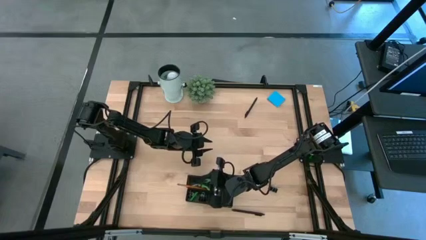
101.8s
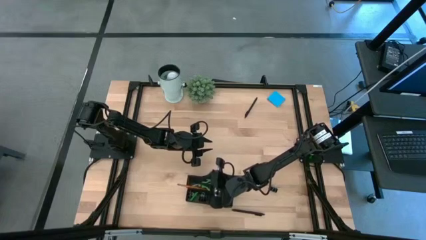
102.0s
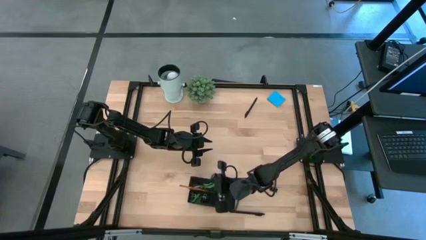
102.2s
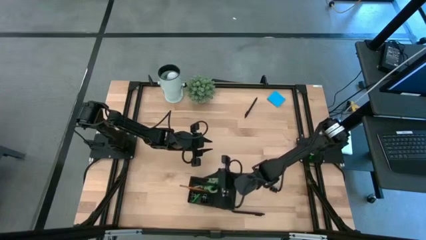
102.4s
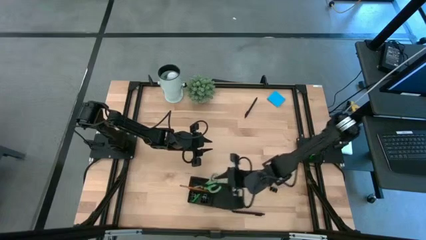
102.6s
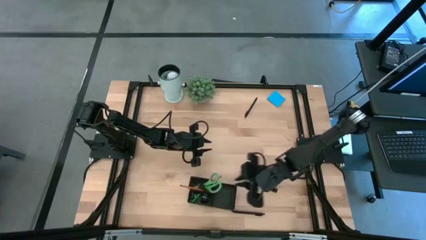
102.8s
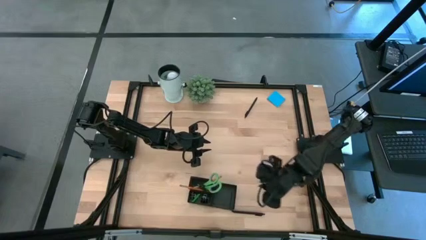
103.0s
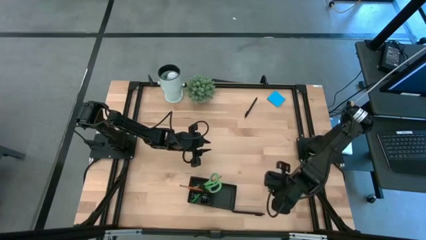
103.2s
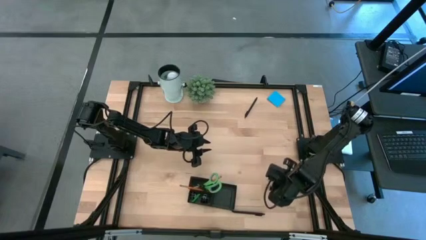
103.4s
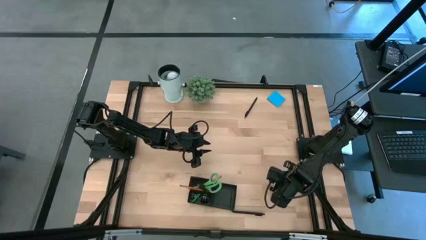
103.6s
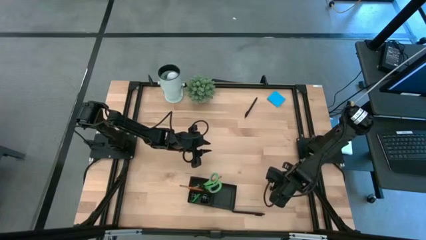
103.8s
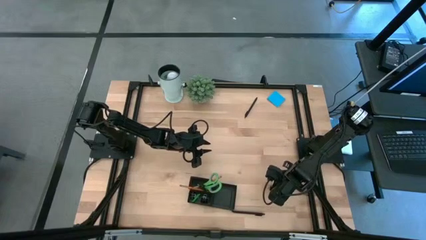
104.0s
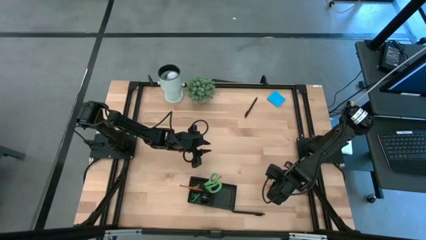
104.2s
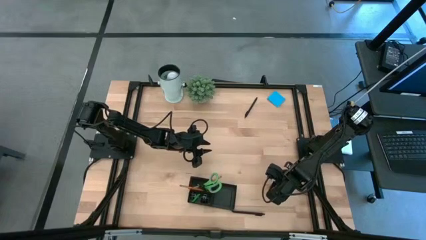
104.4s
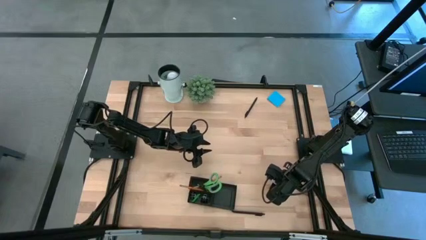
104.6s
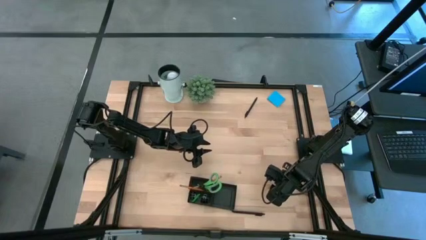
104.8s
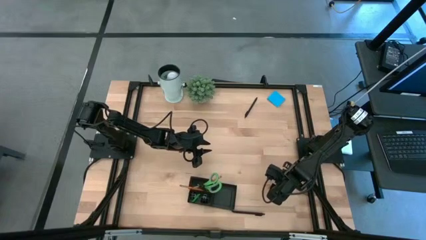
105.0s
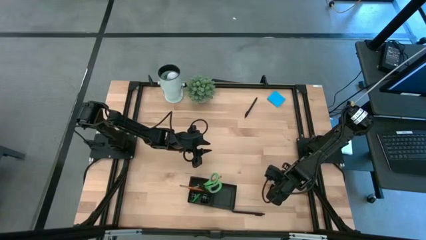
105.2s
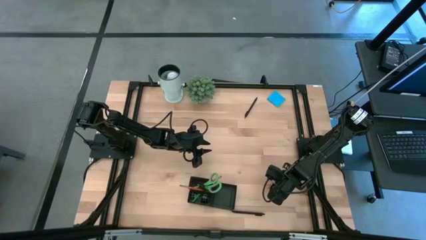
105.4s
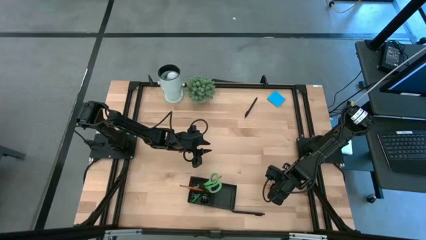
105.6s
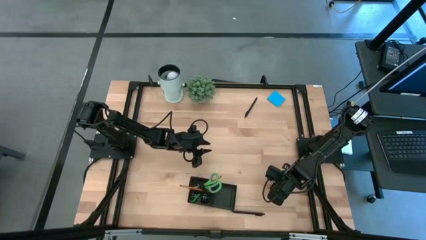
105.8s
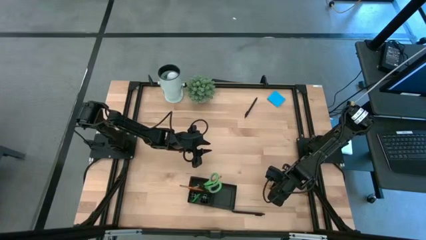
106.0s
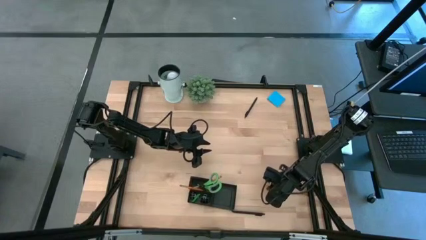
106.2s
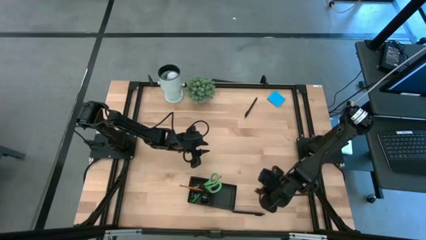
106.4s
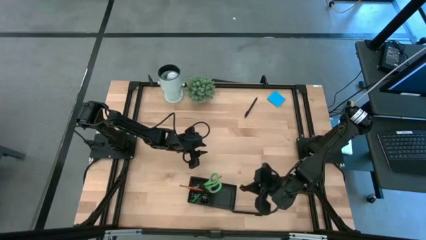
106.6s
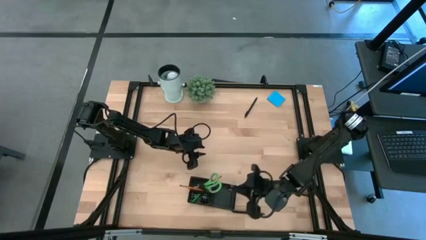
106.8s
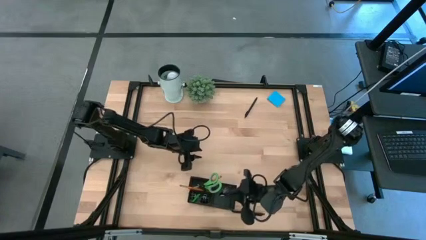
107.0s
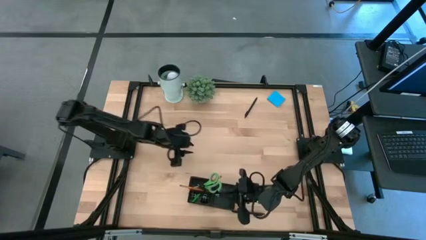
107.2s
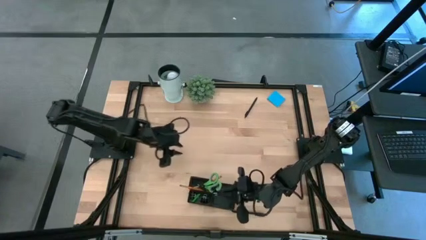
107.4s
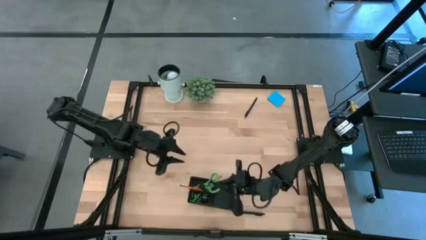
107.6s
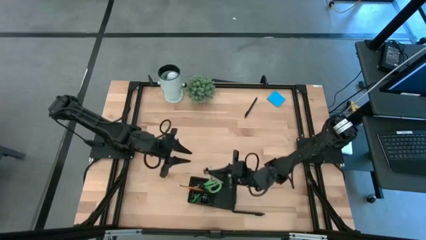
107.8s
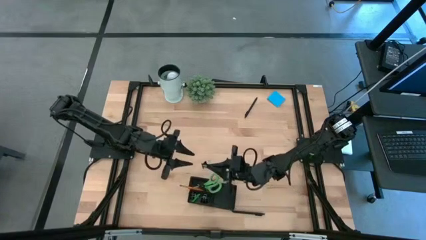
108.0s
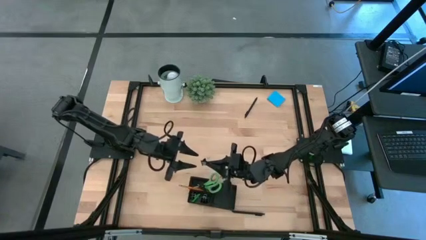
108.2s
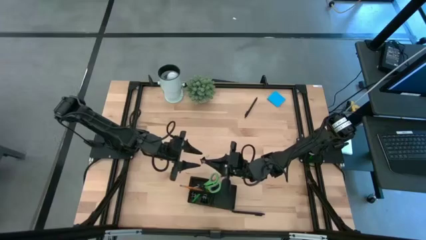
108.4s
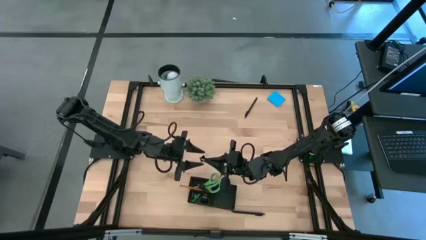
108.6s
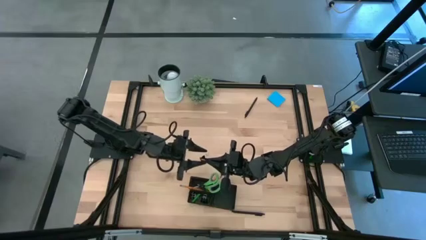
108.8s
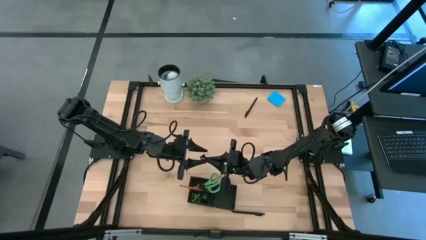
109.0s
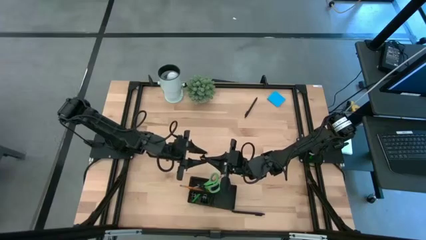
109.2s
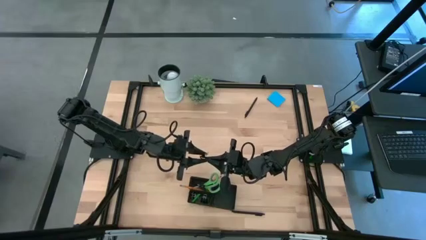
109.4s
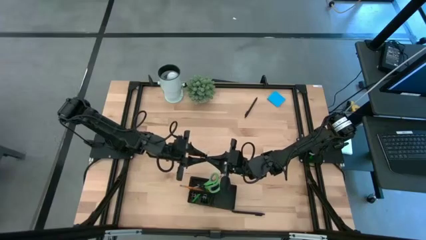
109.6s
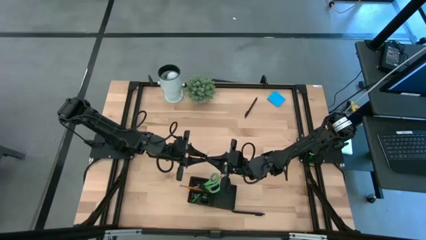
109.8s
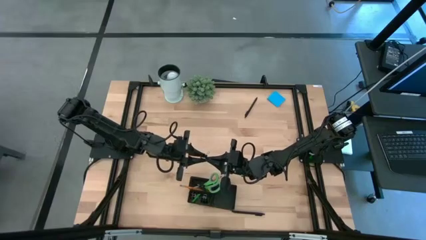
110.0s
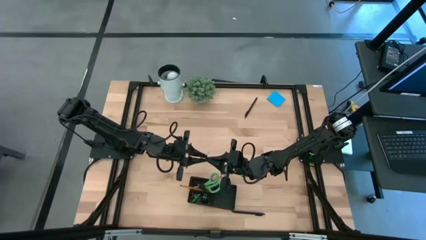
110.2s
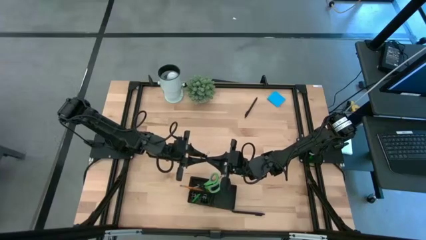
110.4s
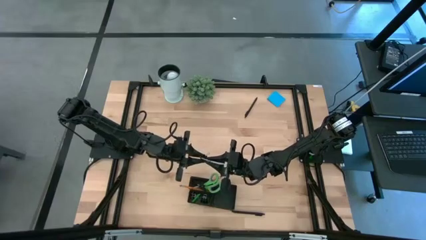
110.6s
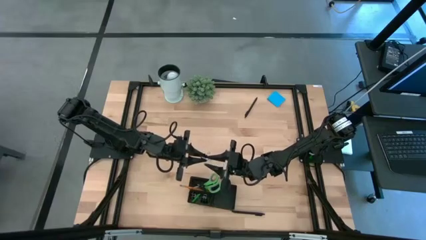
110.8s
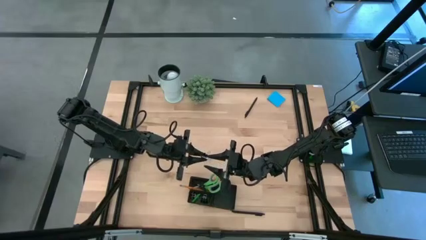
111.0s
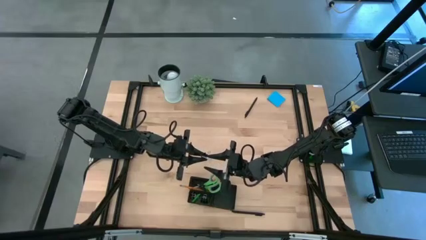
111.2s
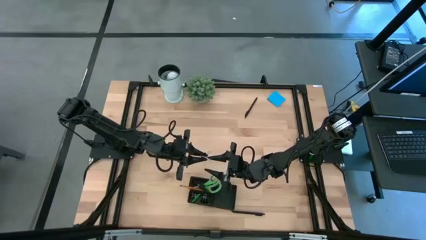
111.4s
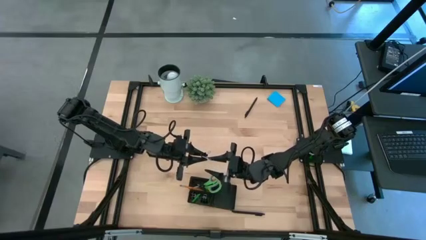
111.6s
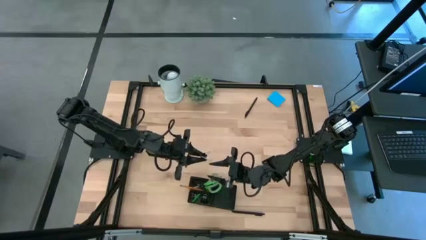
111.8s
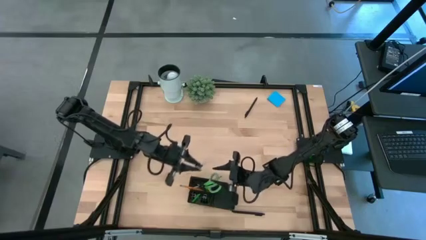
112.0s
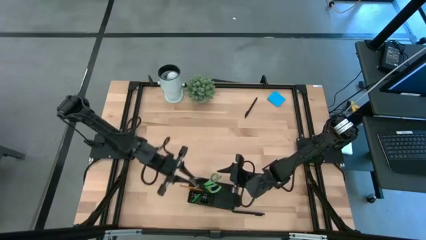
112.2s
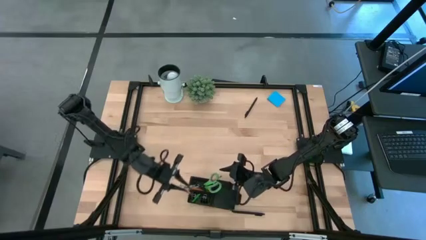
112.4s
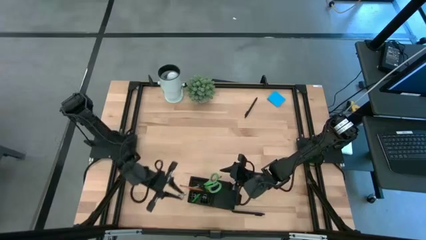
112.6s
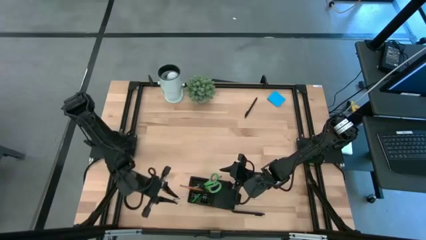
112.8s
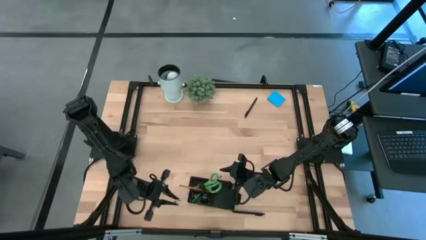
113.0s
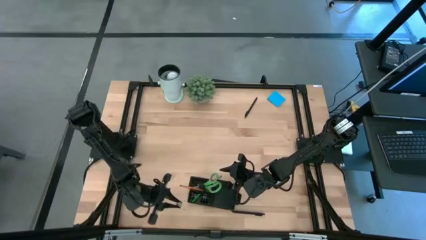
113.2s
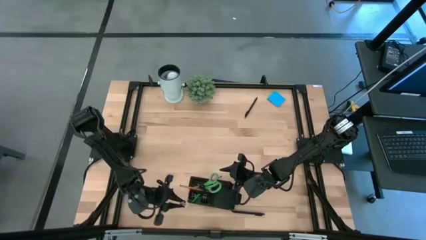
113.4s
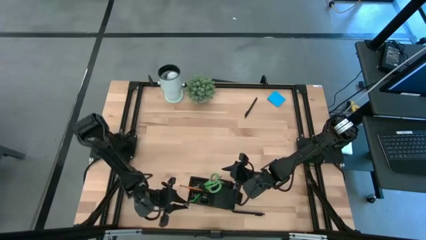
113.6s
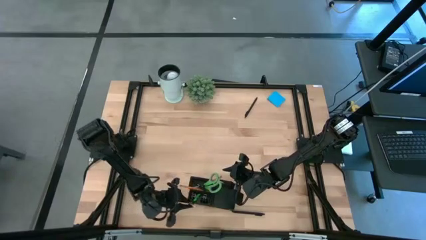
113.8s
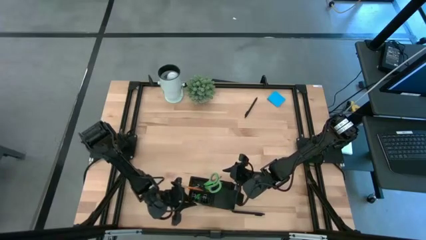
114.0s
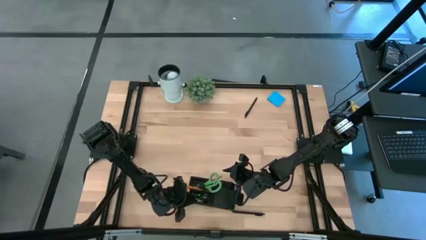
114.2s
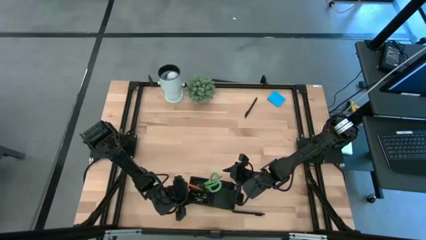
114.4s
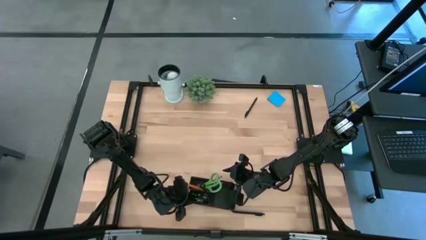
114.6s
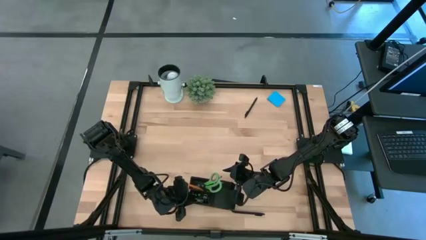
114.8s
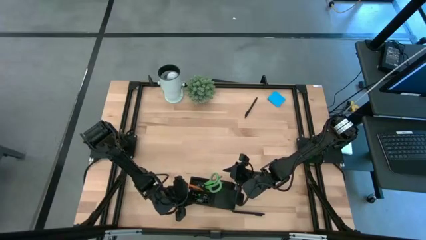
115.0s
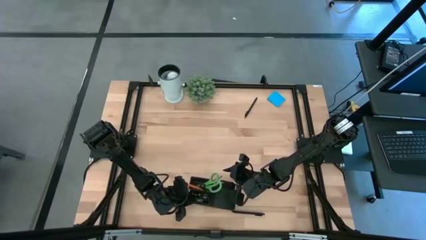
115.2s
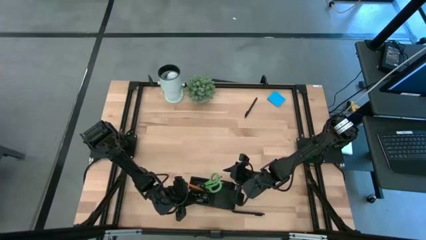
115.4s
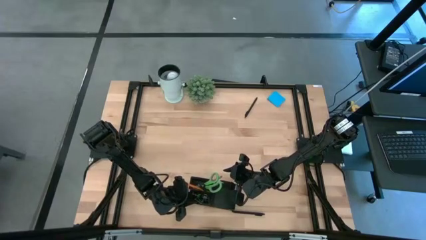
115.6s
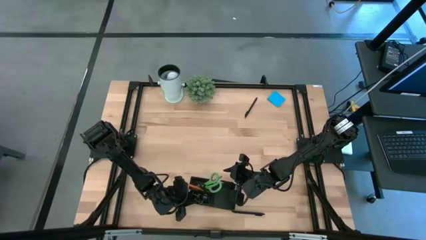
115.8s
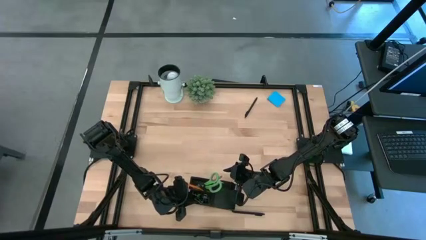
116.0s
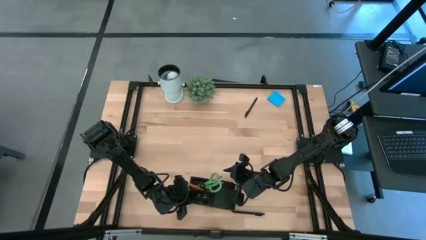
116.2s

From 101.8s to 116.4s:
Task: Pick and place office supplies into organizer
Put the black binder clip into the black desk organizer

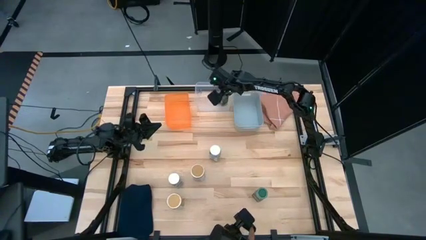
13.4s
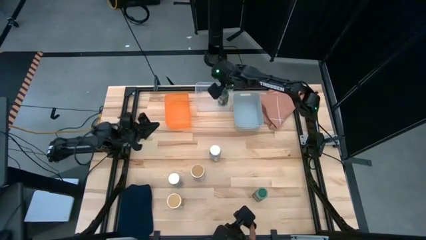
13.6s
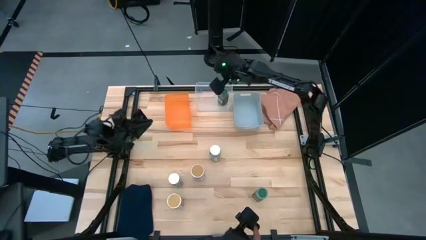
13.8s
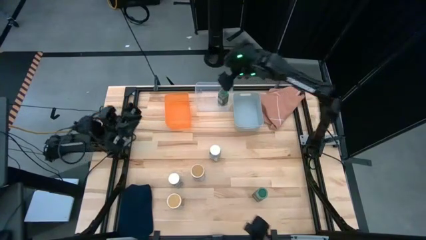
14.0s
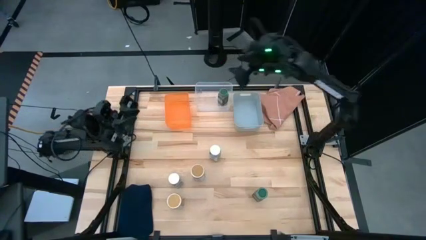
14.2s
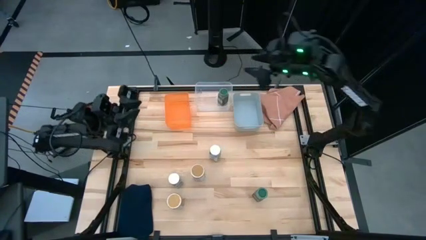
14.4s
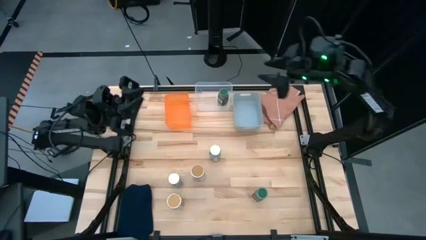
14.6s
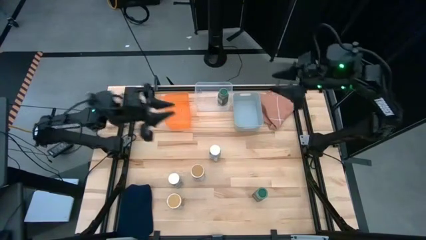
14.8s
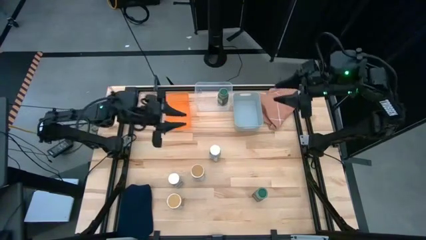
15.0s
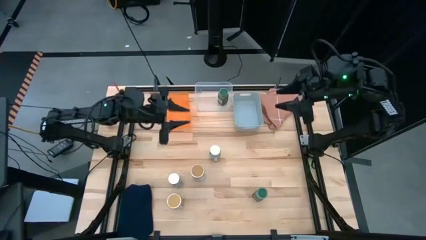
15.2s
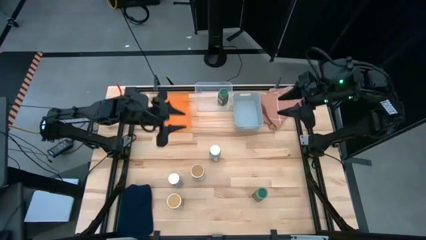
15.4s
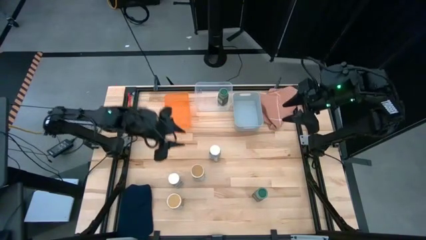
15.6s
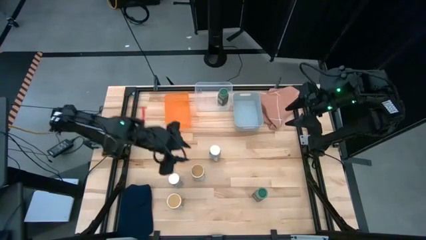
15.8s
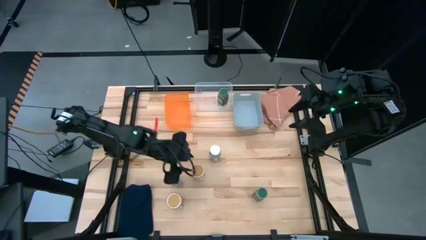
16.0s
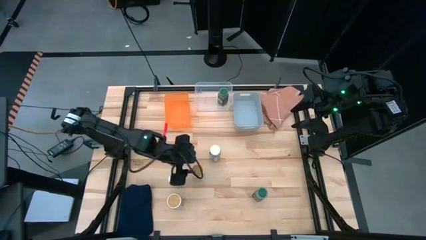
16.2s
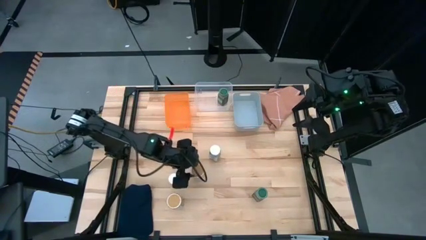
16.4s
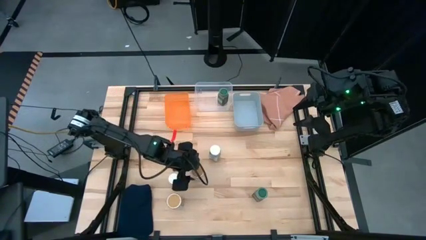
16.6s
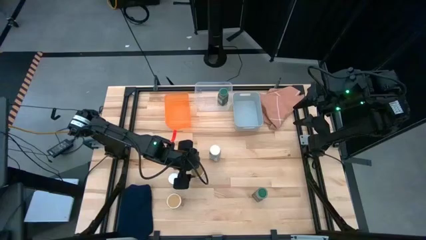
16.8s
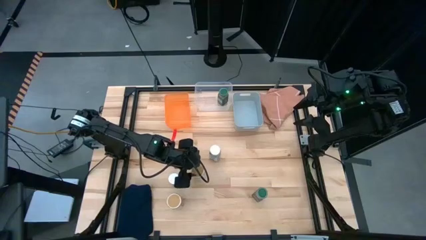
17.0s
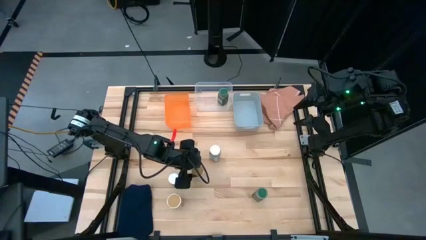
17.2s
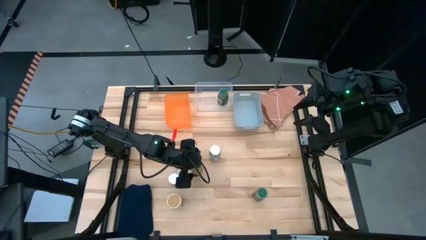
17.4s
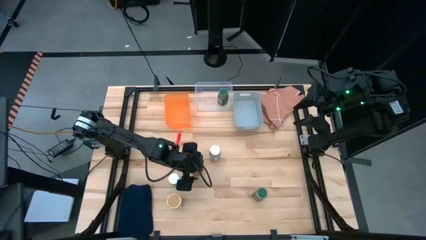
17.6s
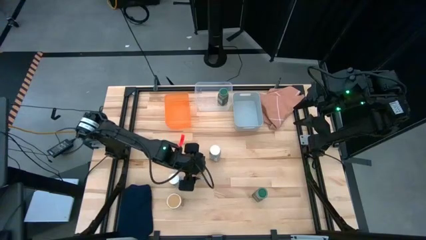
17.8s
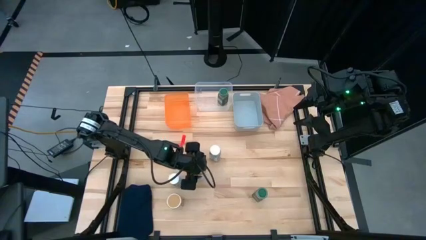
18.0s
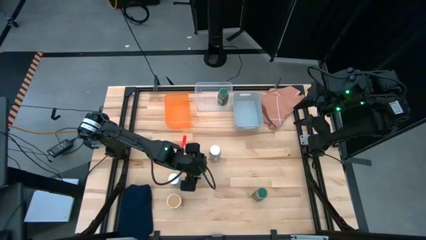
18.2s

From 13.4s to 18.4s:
Task: Sort spices by type
Put the top gold seasoning bottle into the orange bin
